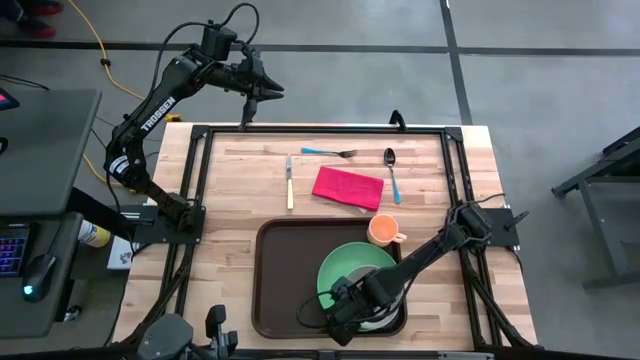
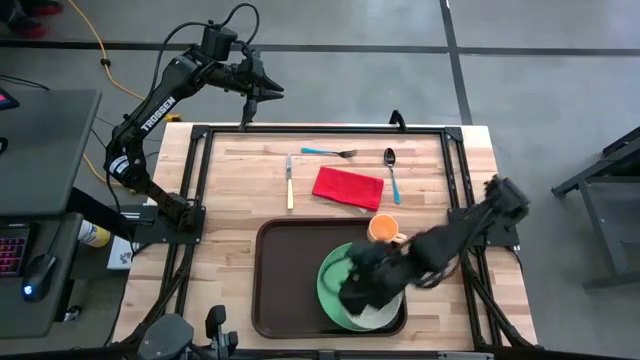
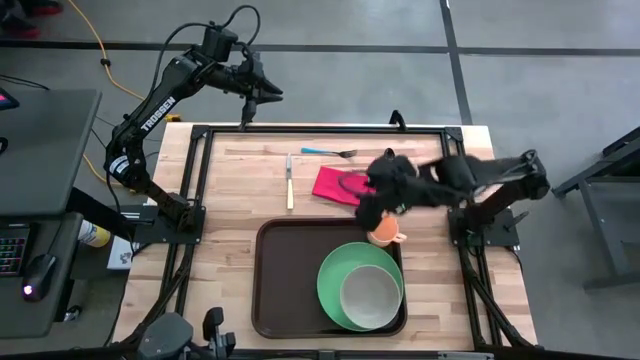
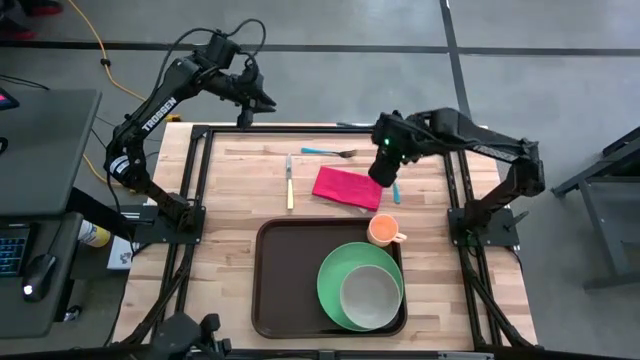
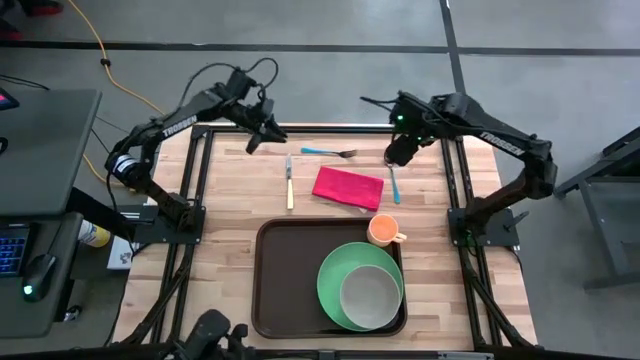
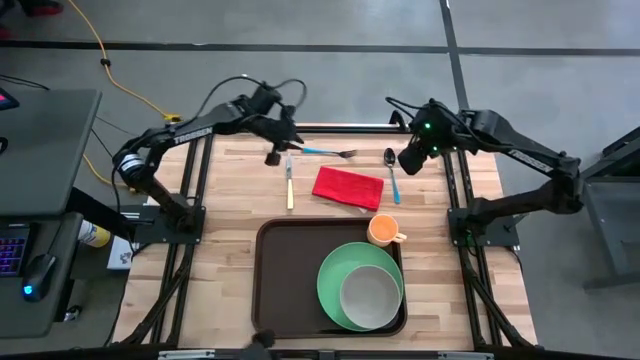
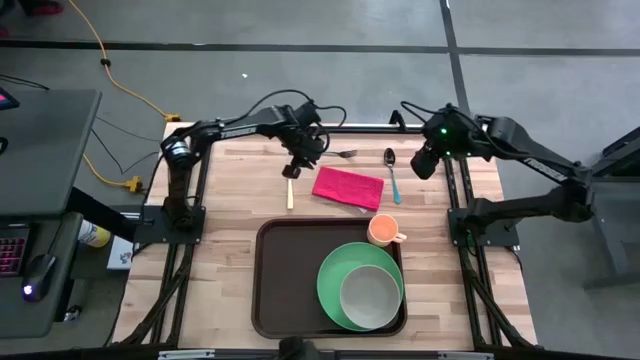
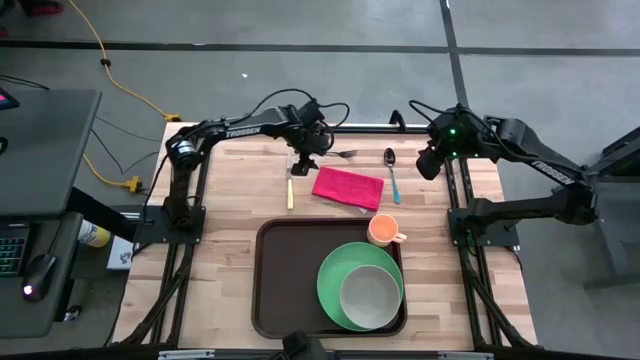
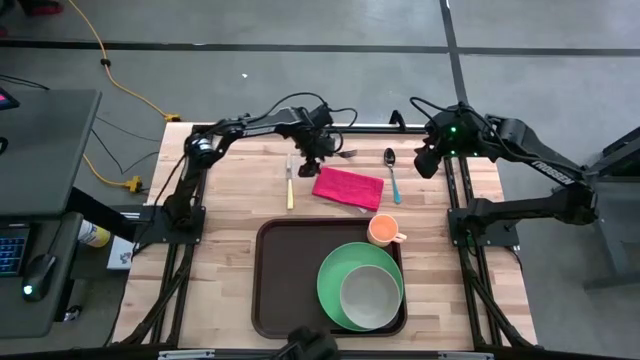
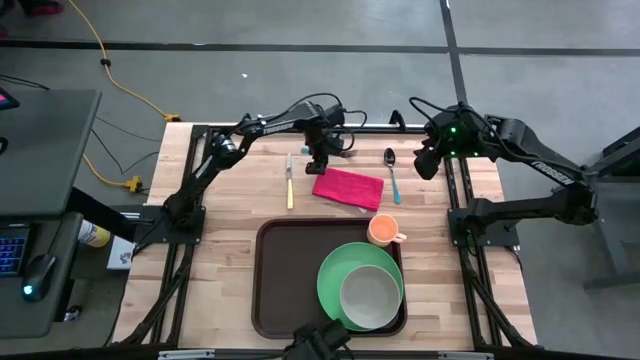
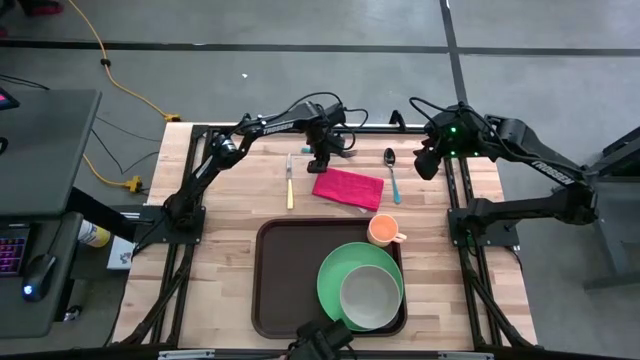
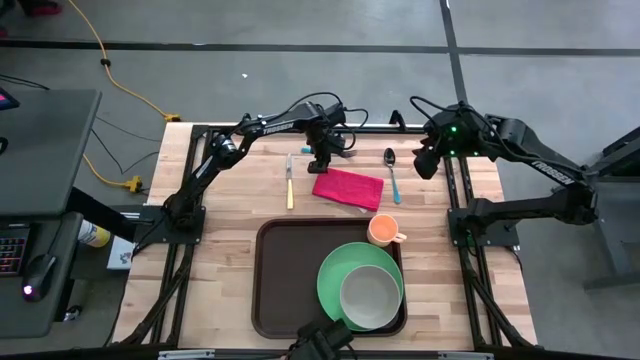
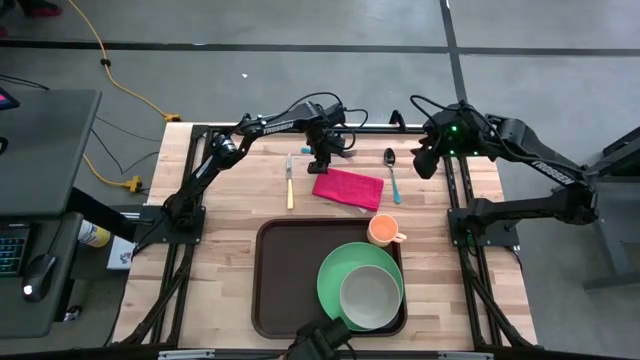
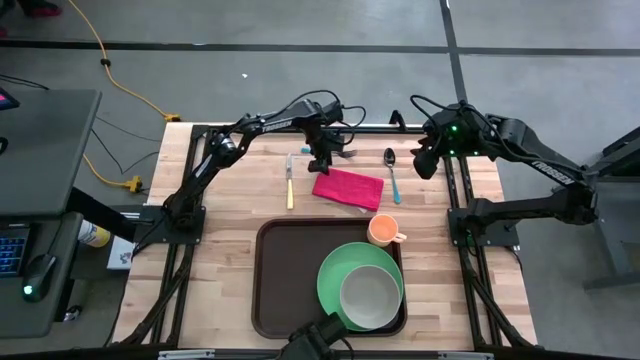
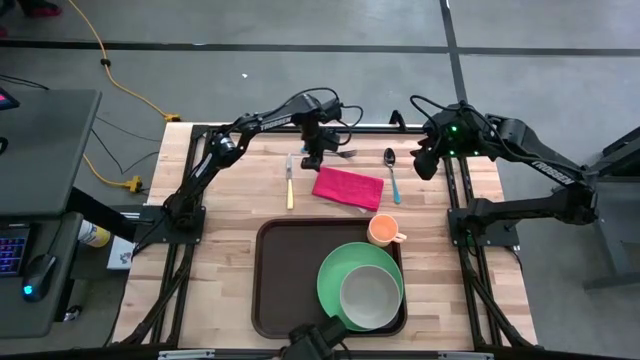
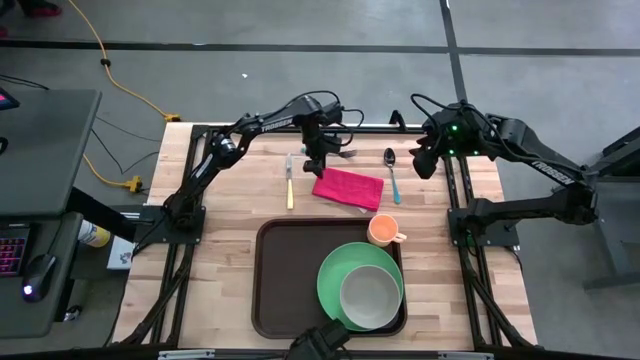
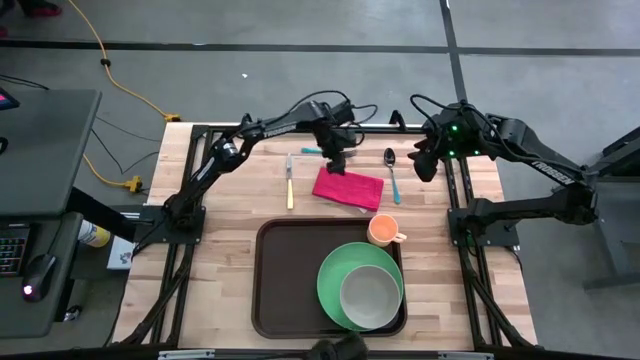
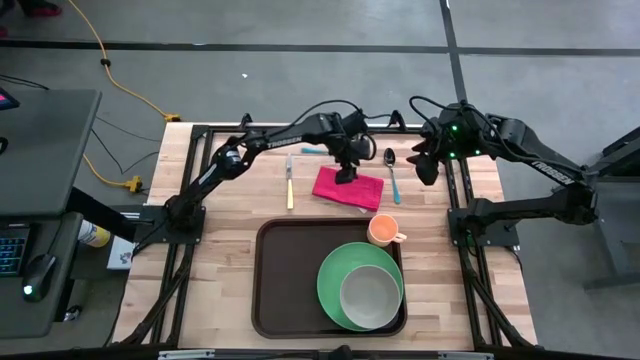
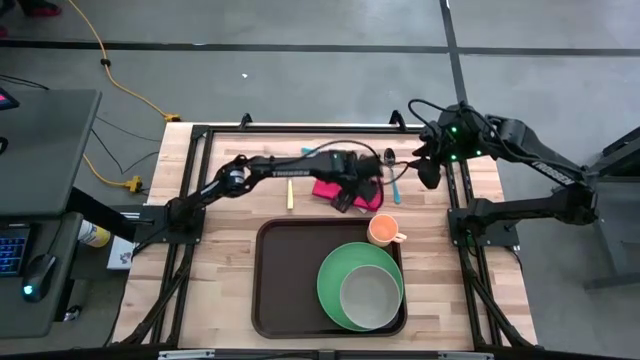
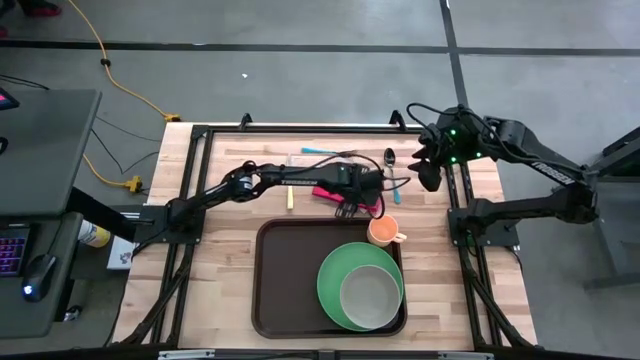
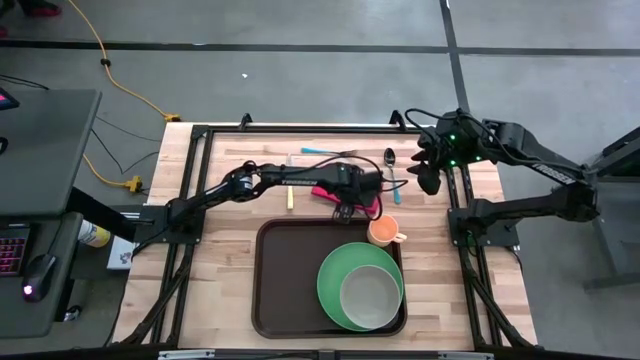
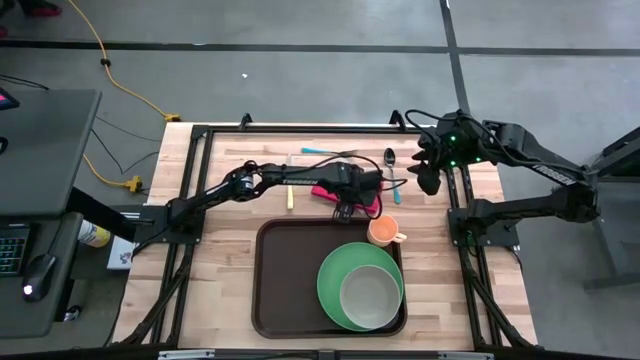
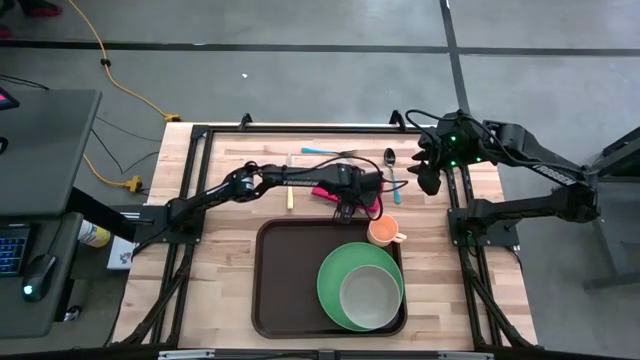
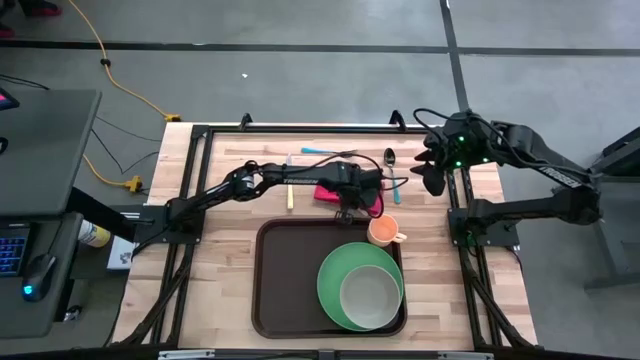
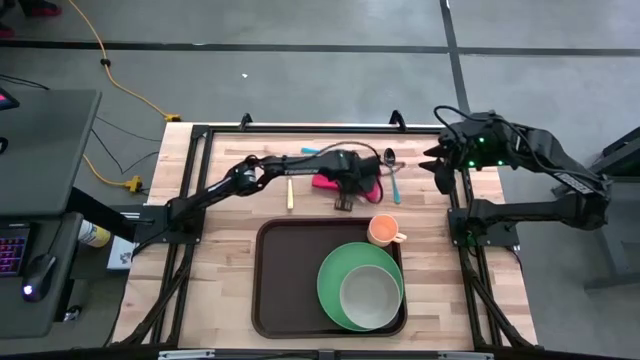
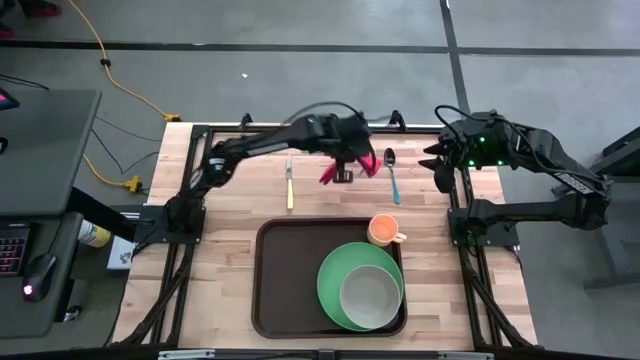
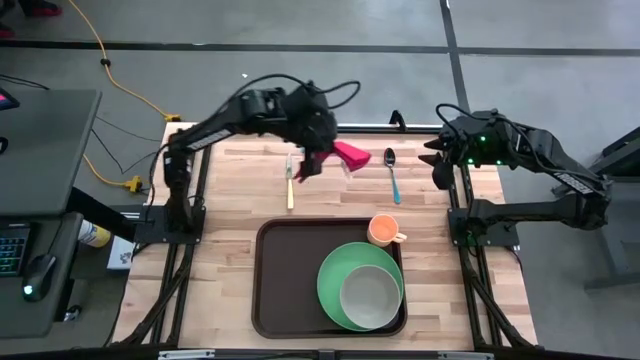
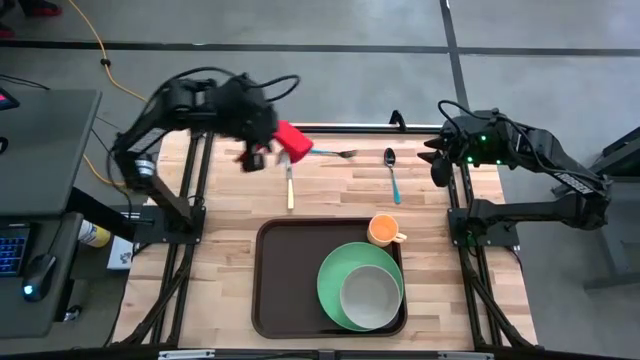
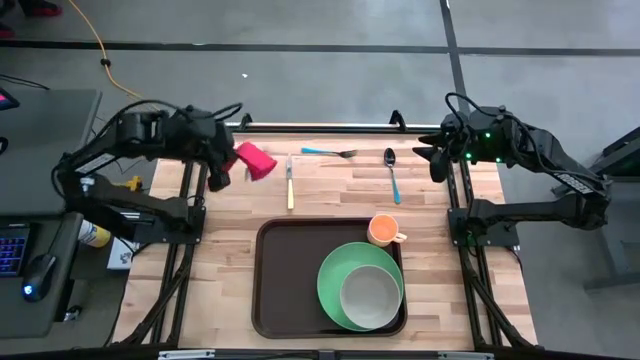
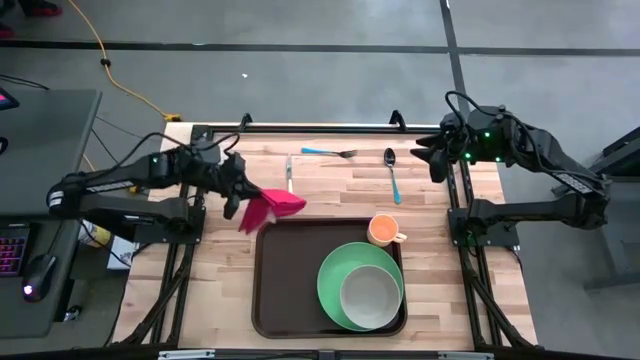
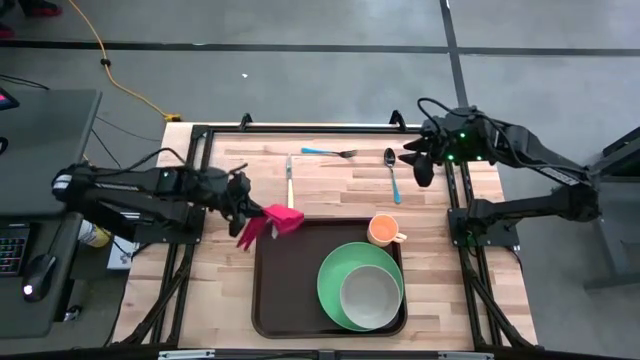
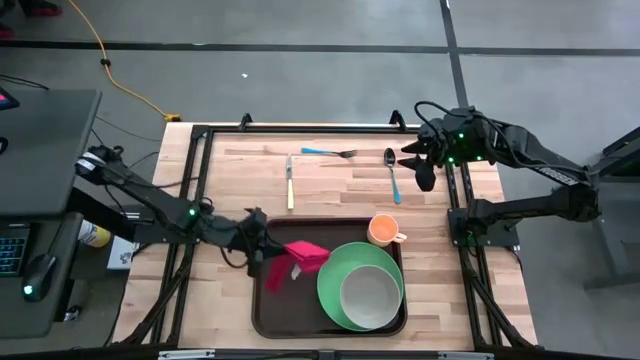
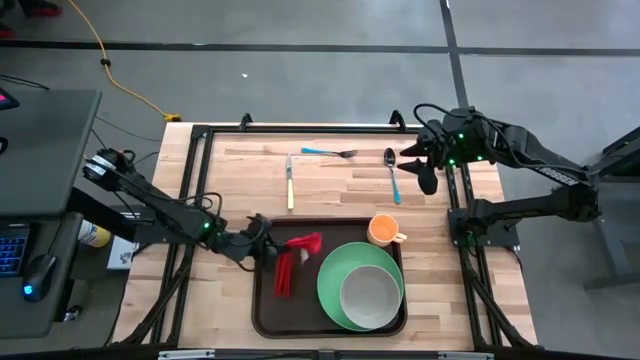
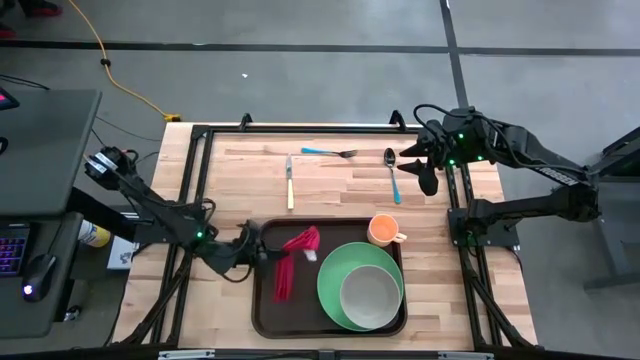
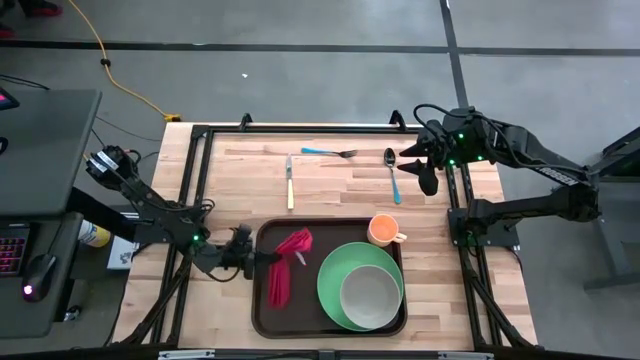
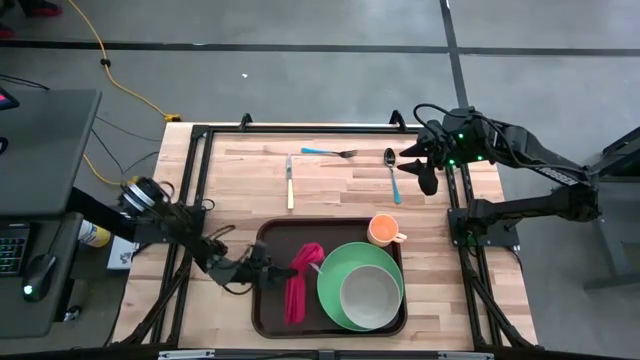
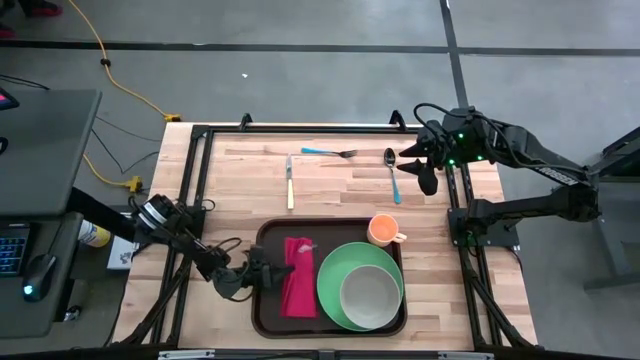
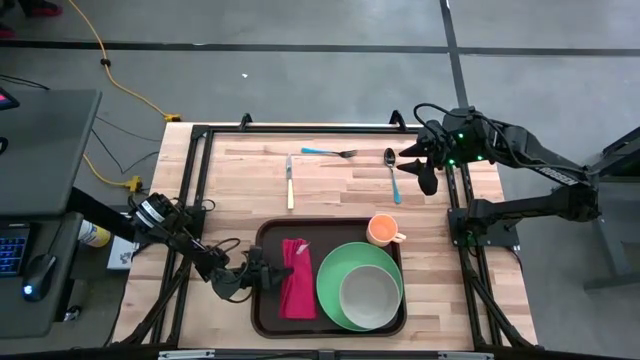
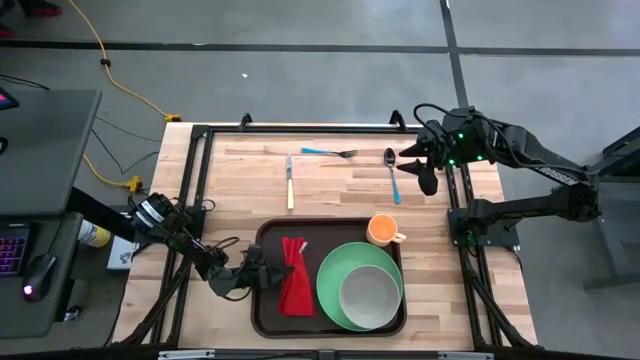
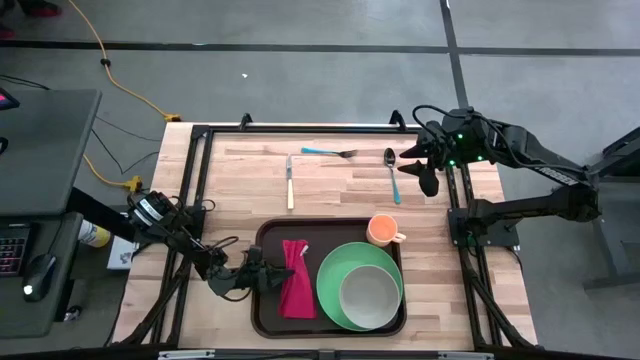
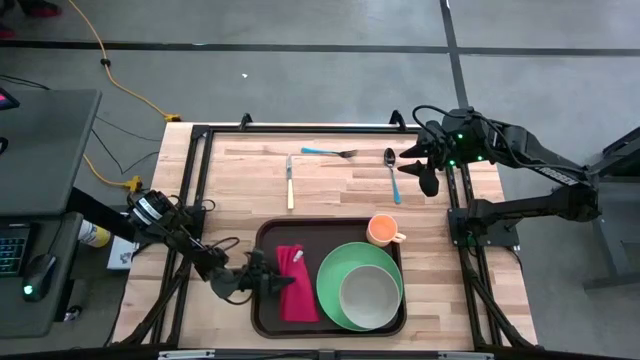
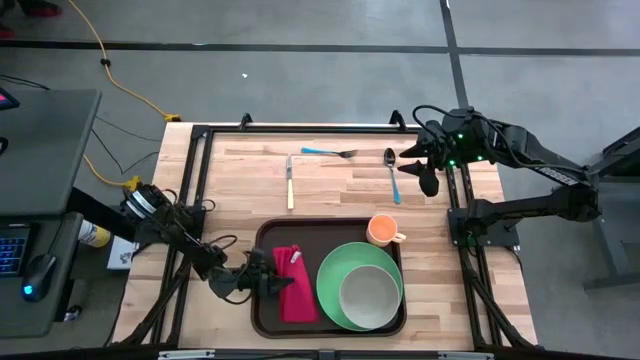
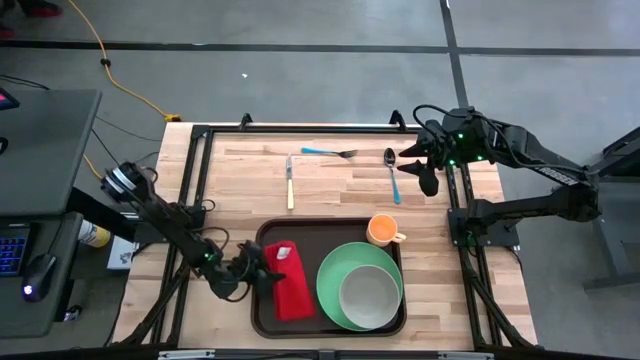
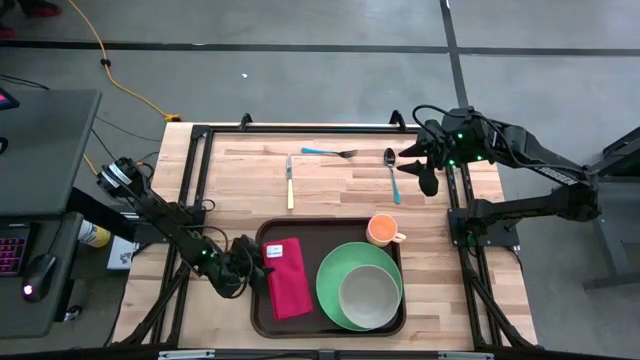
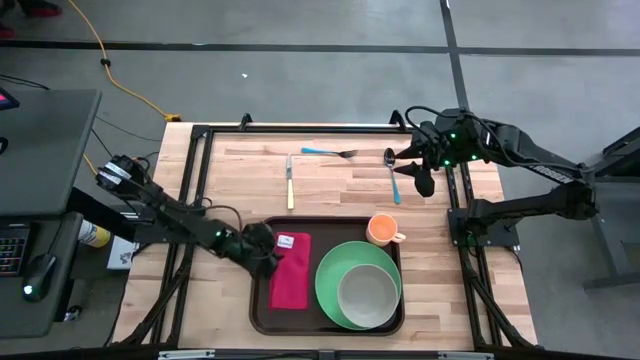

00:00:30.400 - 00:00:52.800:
Task: Set up tray
Put the red cloth table napkin to the left side of the brown tray
